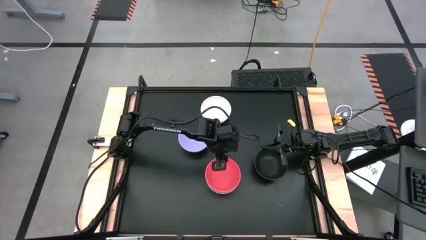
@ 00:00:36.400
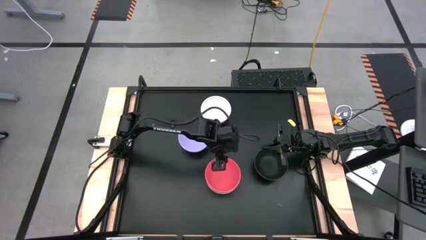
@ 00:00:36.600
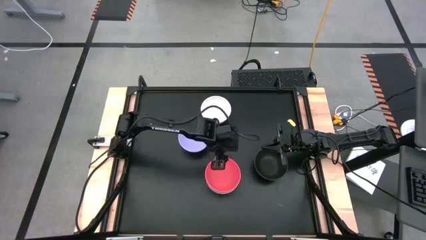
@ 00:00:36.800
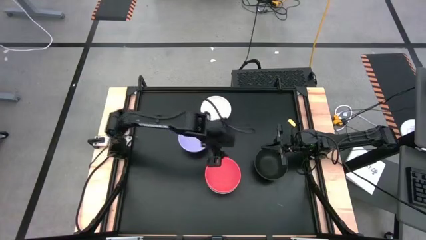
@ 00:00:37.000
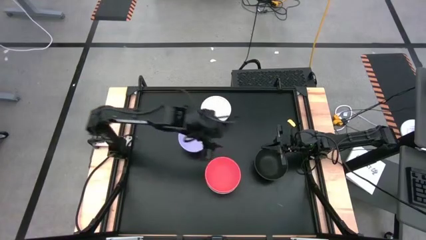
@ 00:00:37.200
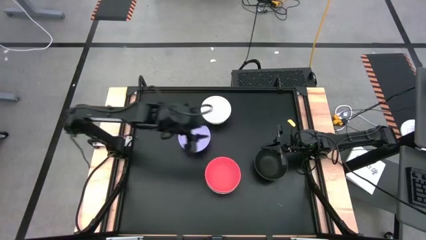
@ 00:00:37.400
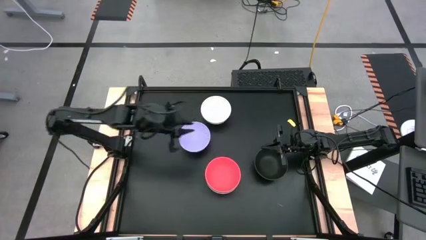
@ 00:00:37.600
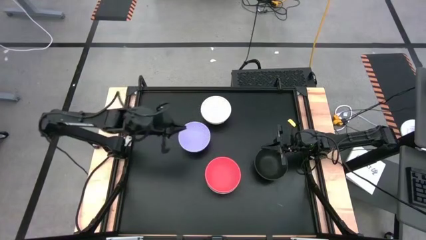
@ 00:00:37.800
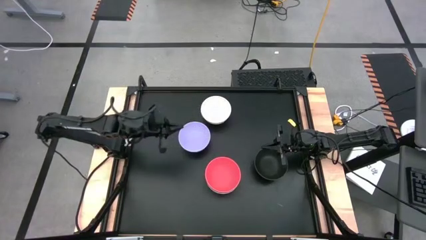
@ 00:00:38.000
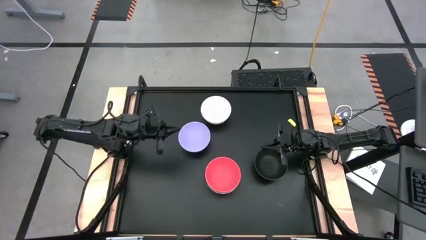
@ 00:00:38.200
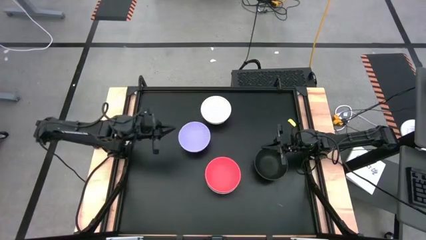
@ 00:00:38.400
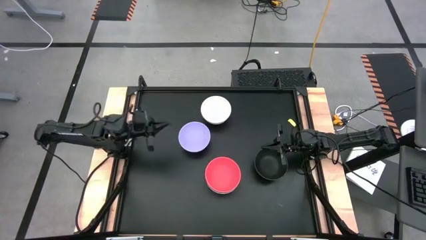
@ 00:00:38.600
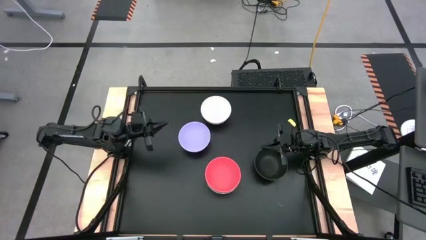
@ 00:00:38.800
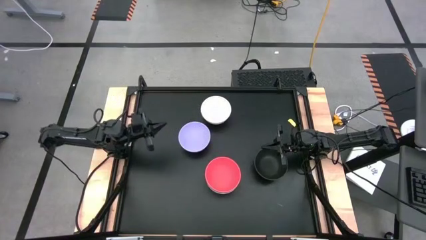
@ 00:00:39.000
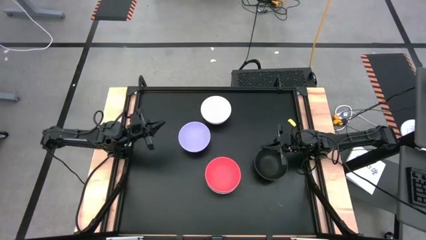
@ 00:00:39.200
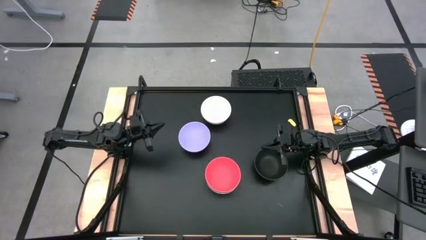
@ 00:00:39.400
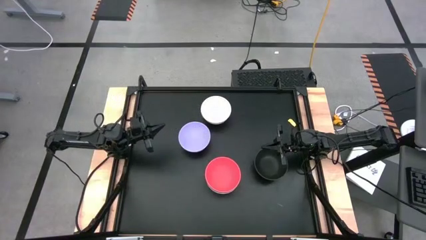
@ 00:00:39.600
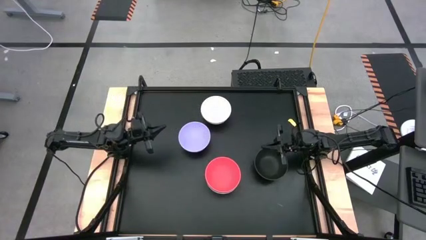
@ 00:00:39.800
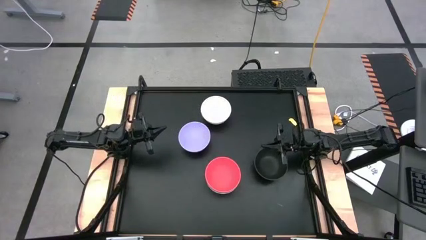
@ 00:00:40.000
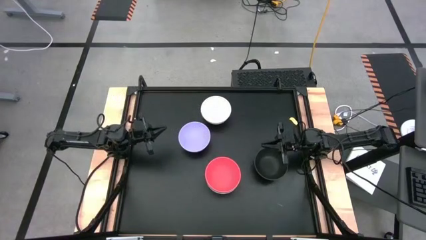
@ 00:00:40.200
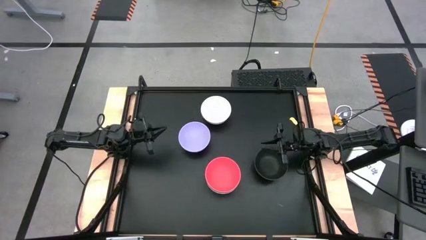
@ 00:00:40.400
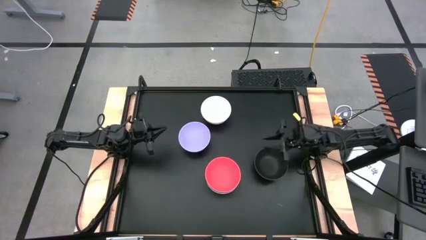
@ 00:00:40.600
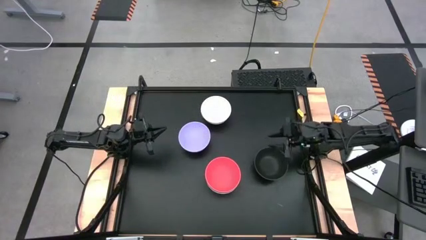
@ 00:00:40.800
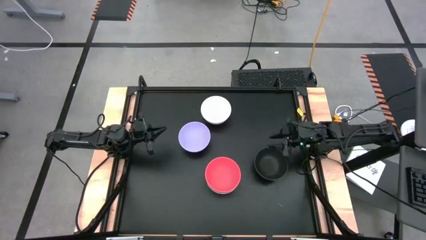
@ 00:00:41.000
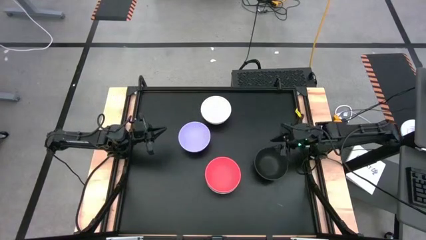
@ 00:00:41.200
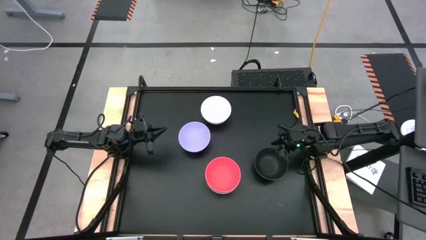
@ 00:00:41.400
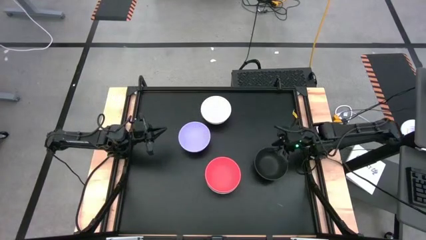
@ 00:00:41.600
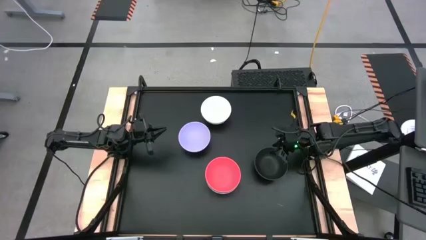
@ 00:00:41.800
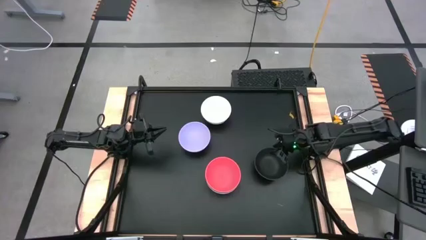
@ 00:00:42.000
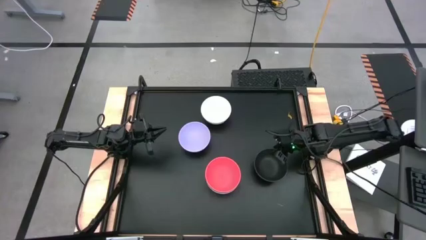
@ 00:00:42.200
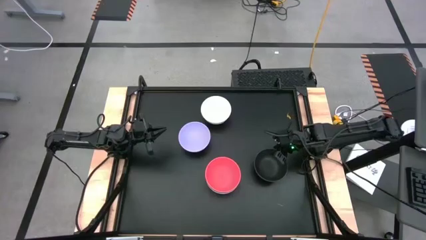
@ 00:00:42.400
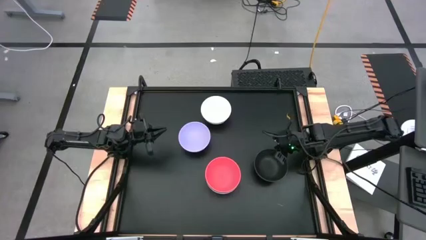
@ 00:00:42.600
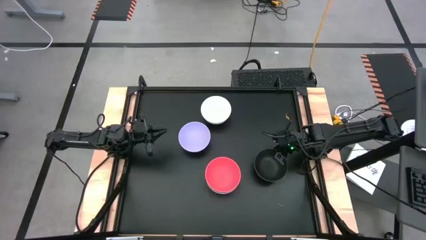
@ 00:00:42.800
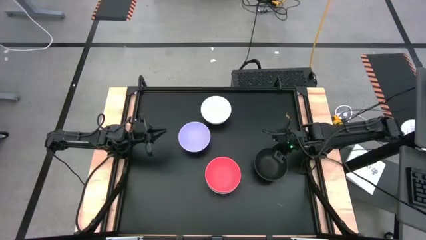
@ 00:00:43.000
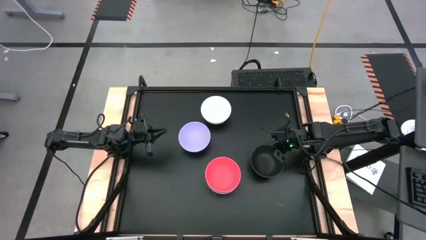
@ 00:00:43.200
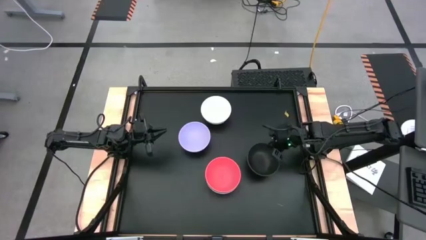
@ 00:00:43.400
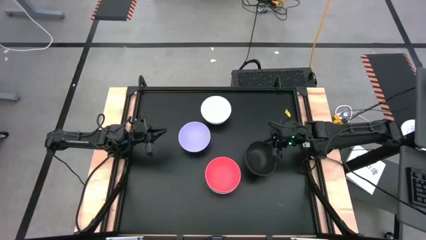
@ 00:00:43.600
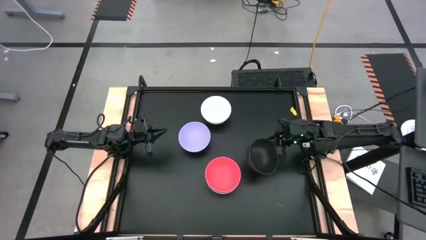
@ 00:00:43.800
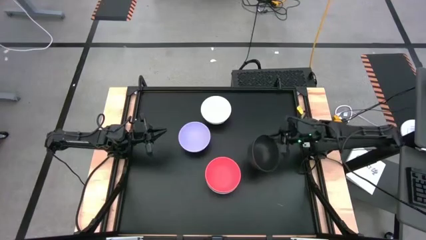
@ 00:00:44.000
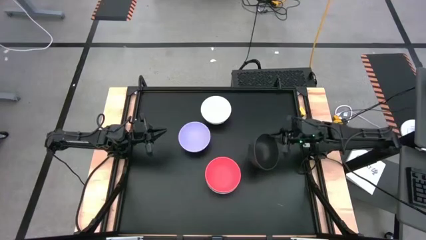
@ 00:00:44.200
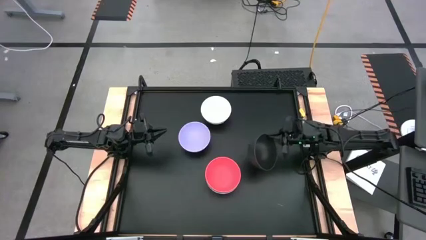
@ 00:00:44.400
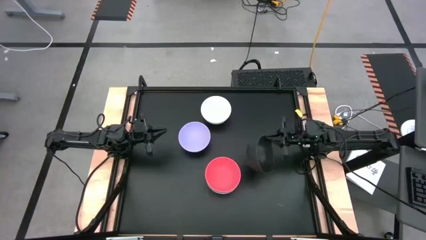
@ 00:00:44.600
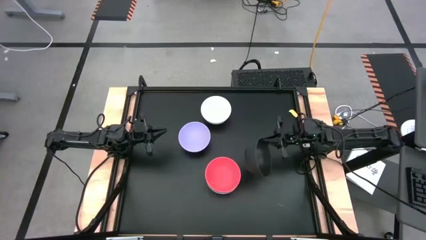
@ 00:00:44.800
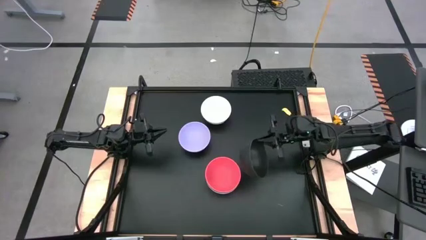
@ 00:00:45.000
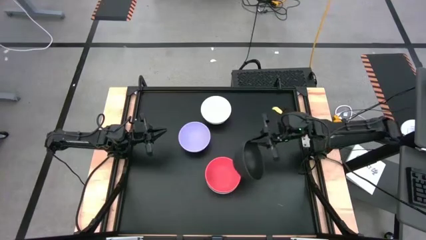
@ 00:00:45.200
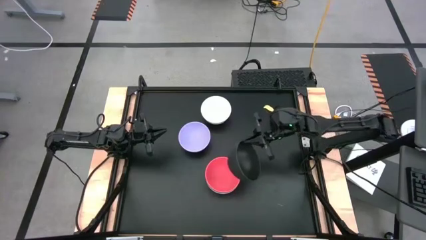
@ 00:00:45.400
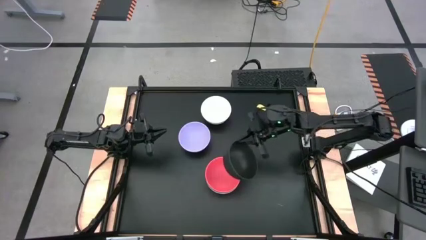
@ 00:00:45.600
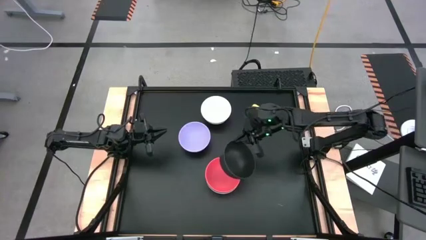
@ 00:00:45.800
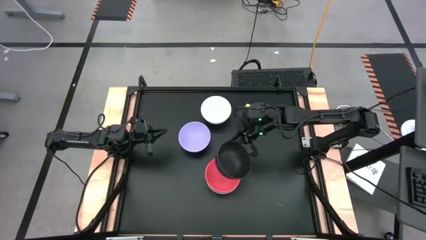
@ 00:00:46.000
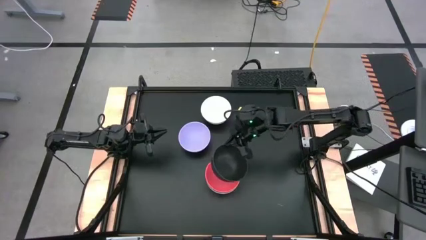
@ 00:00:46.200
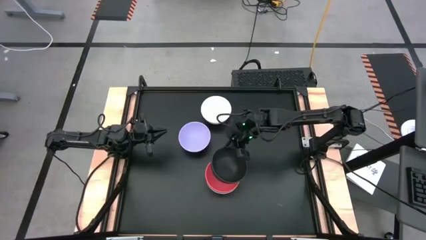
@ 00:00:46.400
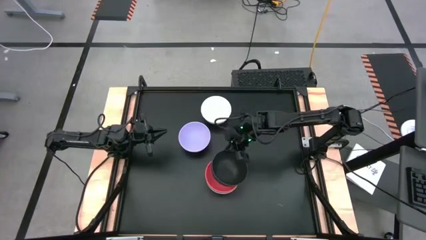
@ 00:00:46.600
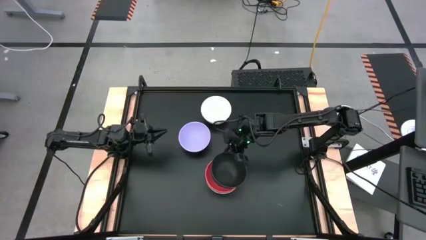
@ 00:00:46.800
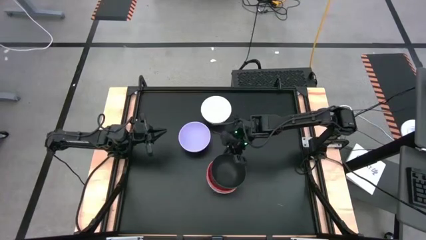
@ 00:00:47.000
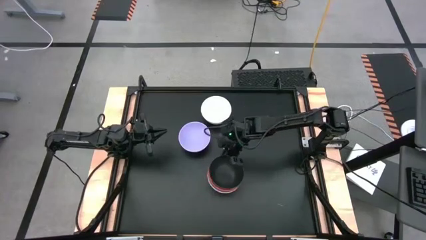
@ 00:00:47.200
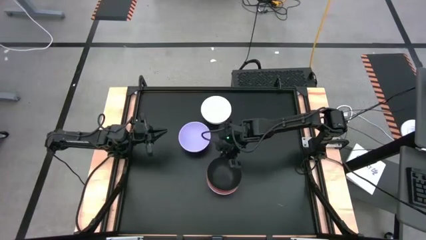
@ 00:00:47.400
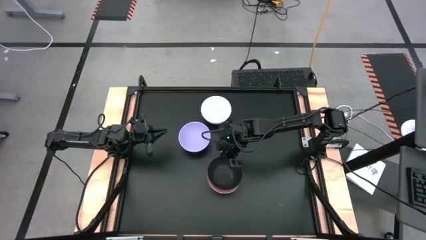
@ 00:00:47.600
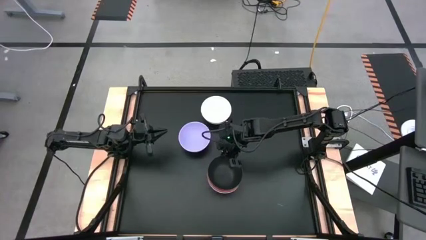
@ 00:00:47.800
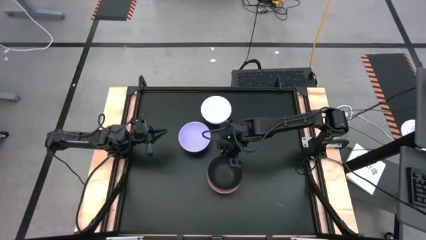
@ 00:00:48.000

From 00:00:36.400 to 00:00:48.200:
Task: Nest bowls inside each other
Stack the black bowl on top of the pink bowl
